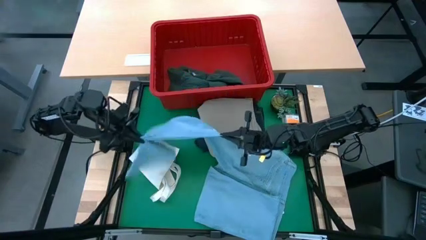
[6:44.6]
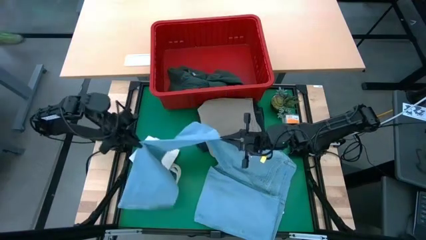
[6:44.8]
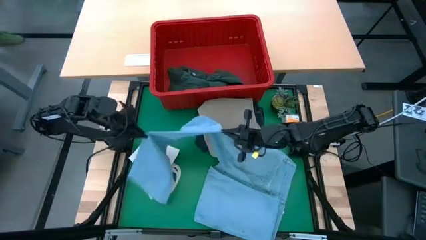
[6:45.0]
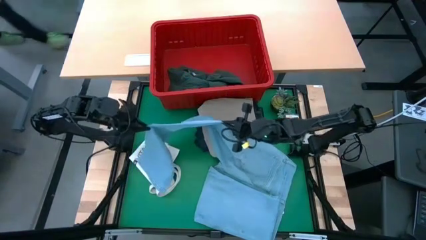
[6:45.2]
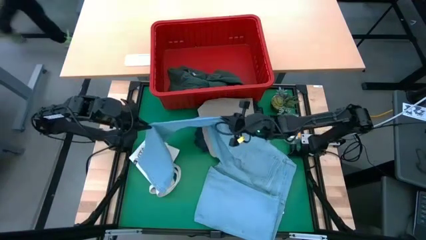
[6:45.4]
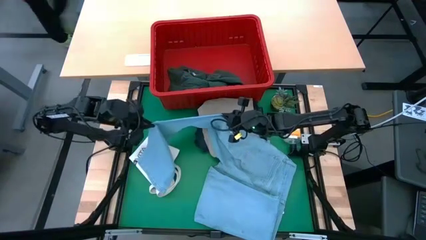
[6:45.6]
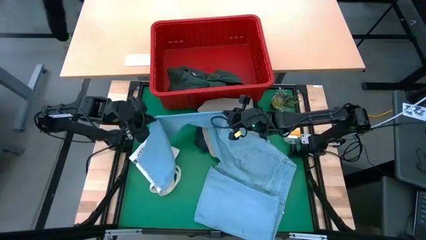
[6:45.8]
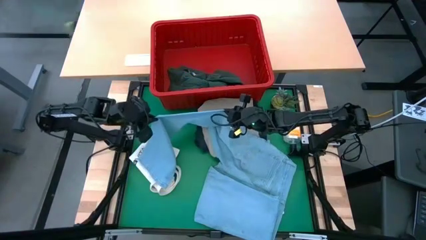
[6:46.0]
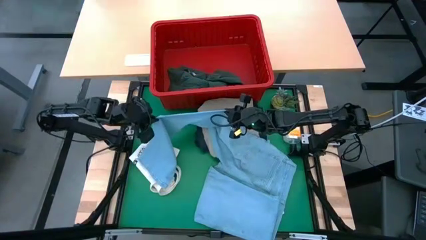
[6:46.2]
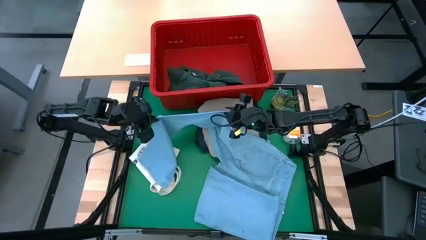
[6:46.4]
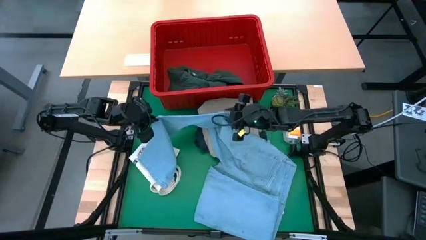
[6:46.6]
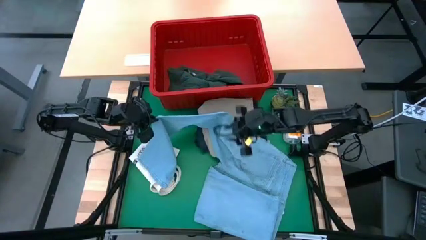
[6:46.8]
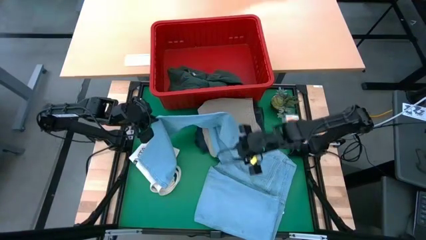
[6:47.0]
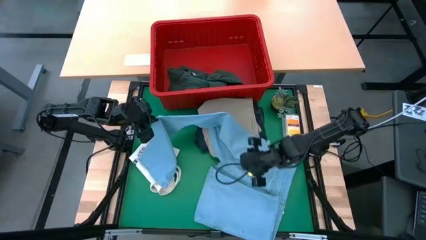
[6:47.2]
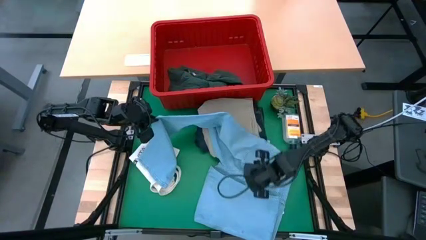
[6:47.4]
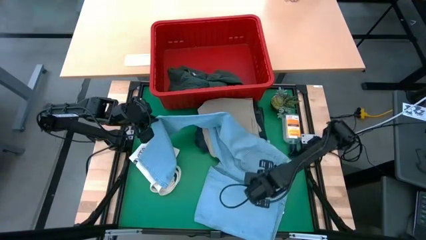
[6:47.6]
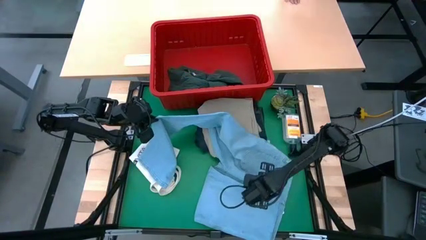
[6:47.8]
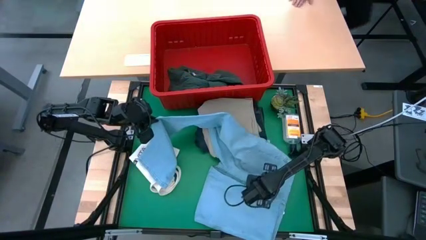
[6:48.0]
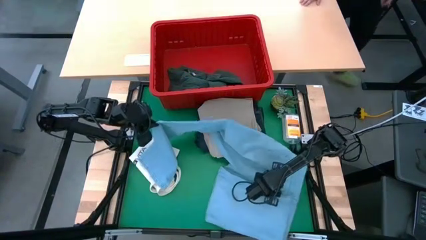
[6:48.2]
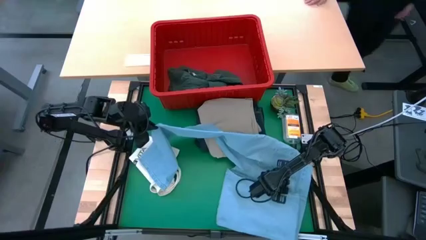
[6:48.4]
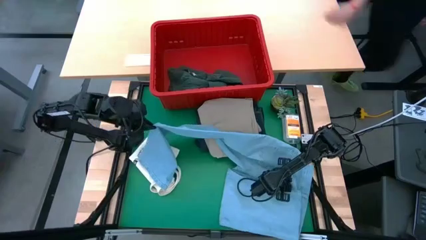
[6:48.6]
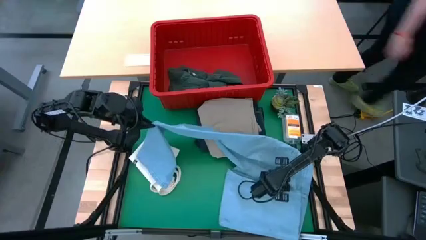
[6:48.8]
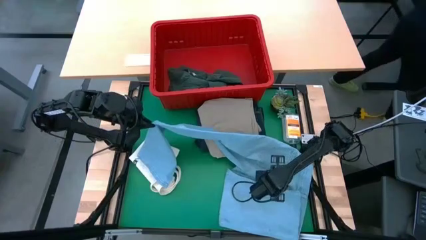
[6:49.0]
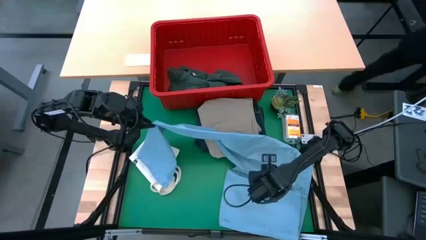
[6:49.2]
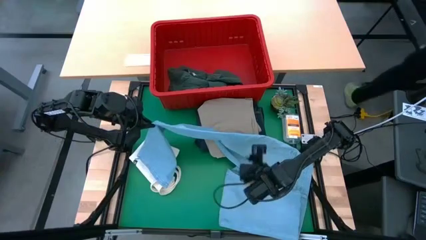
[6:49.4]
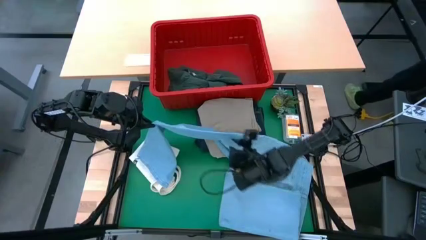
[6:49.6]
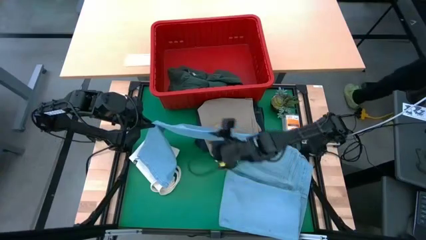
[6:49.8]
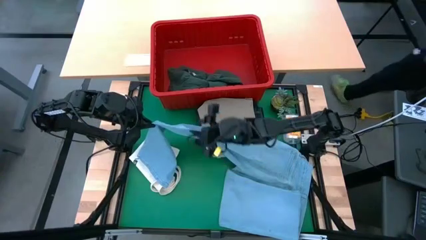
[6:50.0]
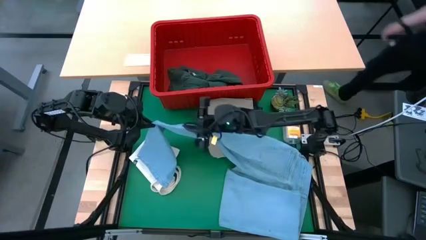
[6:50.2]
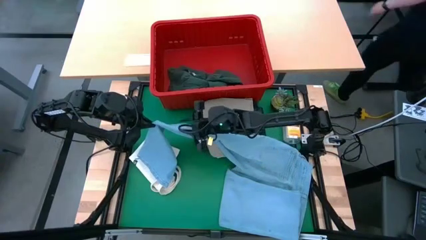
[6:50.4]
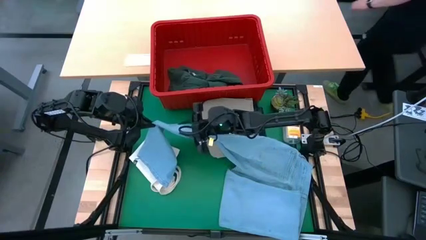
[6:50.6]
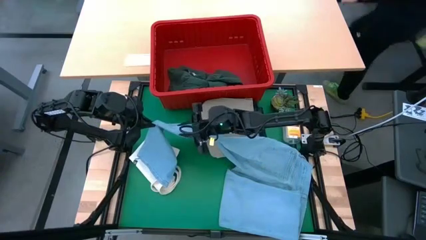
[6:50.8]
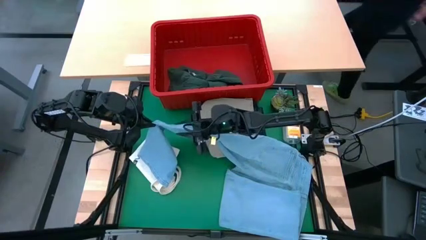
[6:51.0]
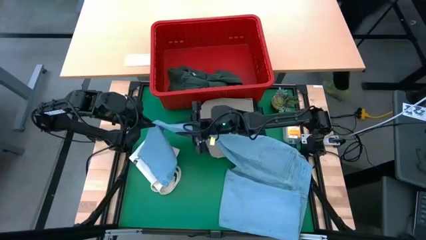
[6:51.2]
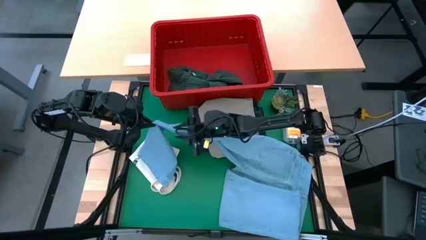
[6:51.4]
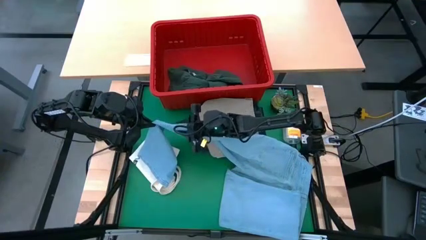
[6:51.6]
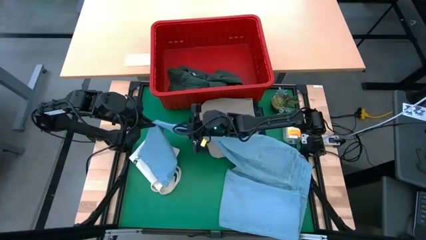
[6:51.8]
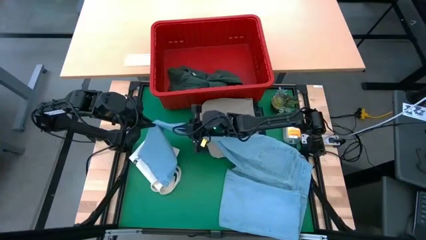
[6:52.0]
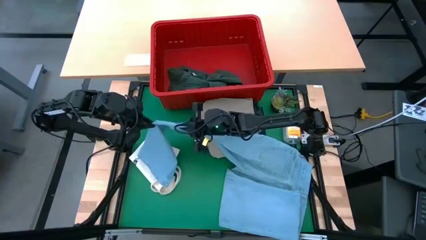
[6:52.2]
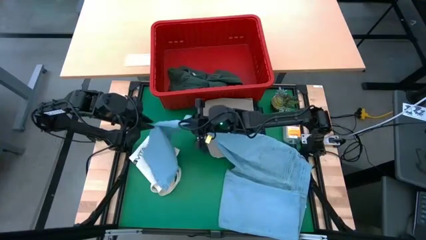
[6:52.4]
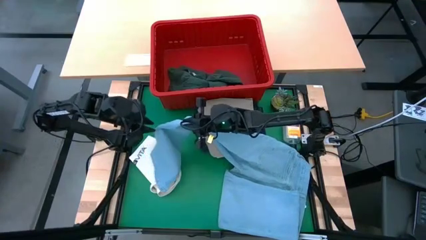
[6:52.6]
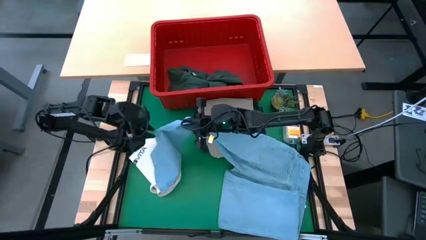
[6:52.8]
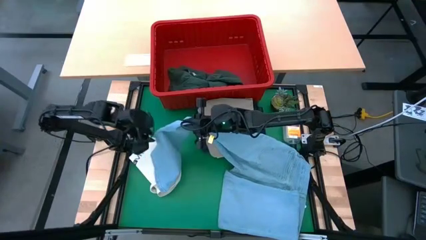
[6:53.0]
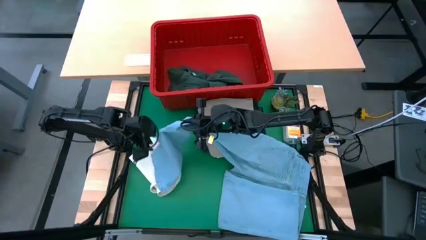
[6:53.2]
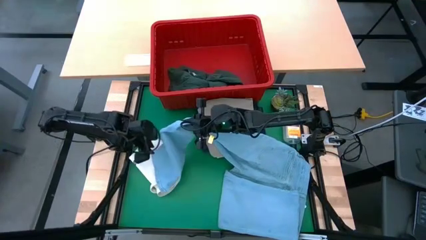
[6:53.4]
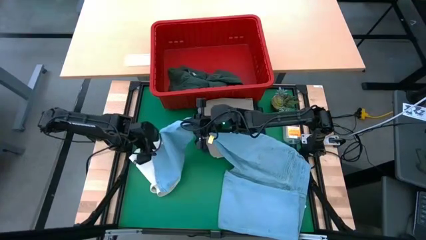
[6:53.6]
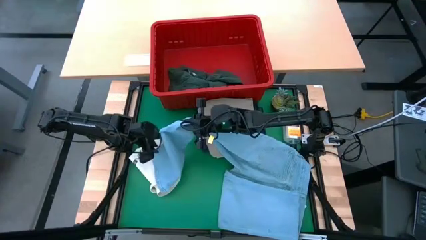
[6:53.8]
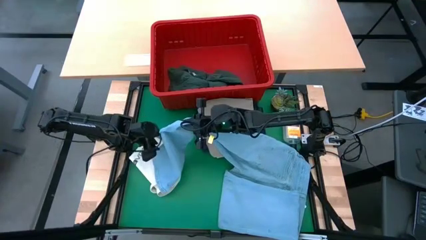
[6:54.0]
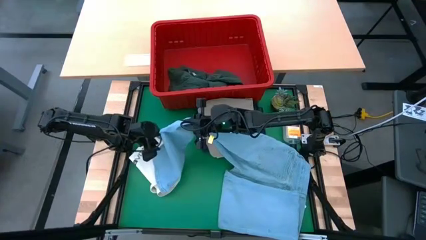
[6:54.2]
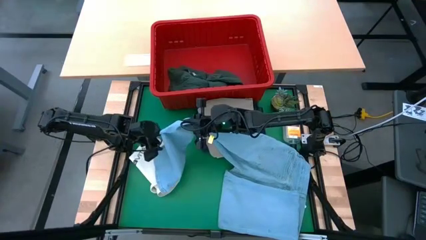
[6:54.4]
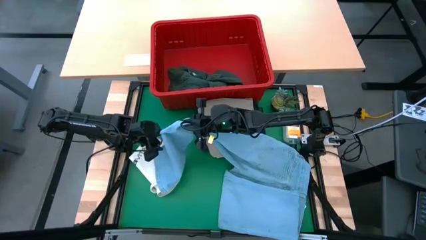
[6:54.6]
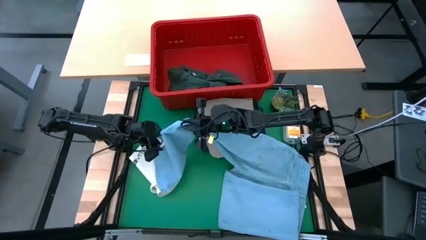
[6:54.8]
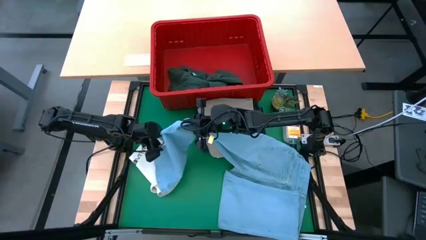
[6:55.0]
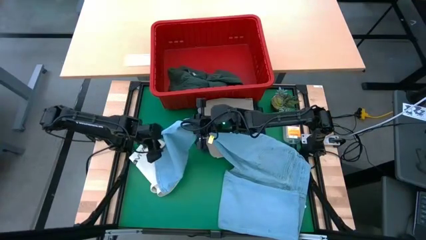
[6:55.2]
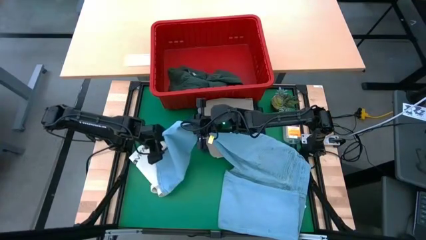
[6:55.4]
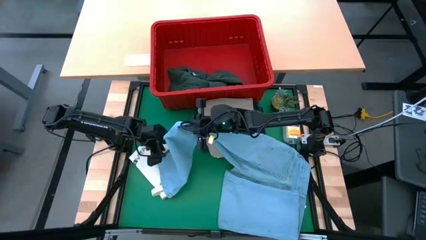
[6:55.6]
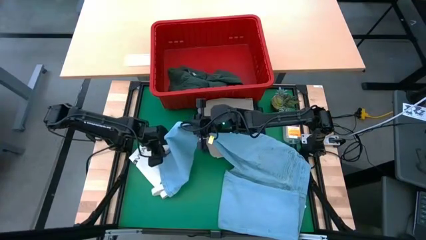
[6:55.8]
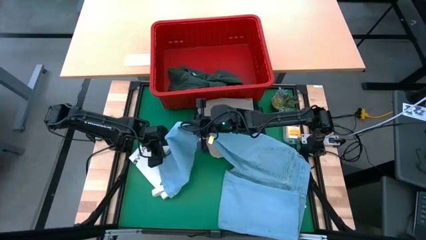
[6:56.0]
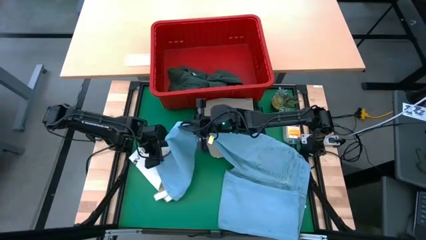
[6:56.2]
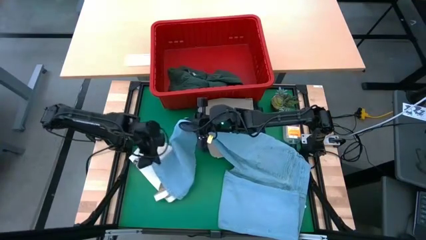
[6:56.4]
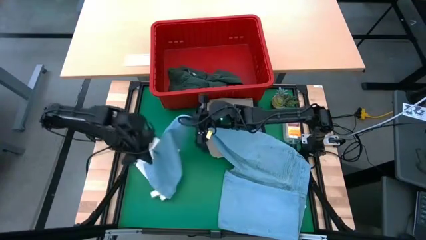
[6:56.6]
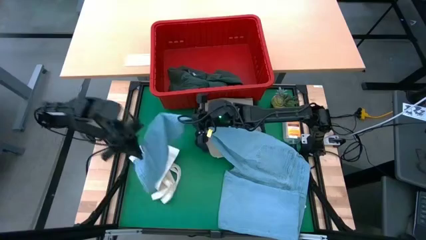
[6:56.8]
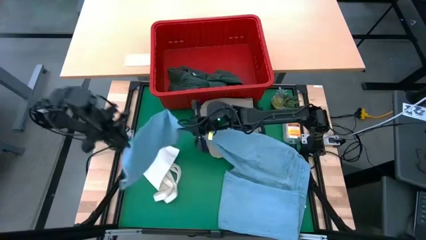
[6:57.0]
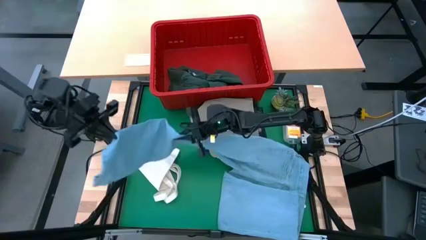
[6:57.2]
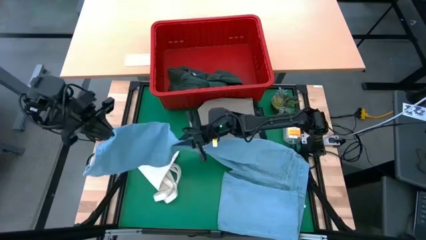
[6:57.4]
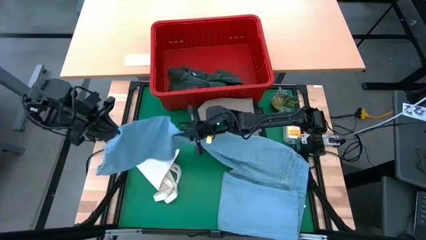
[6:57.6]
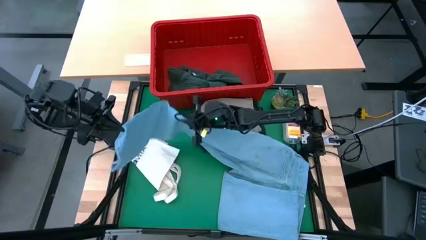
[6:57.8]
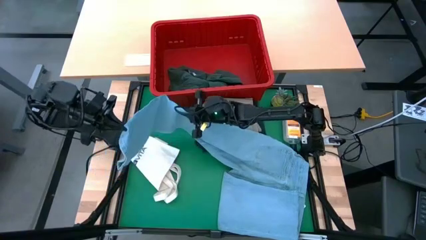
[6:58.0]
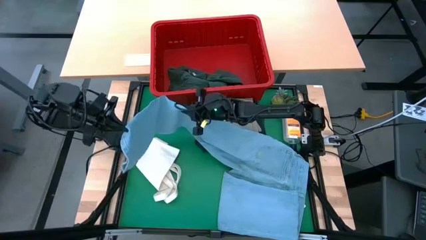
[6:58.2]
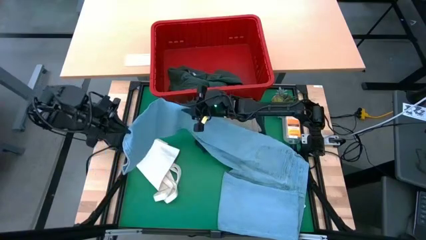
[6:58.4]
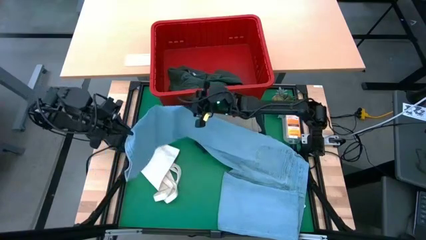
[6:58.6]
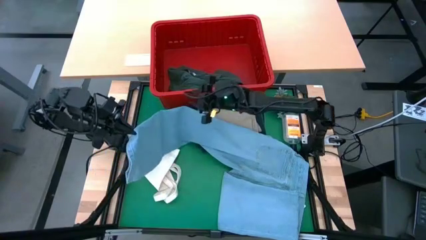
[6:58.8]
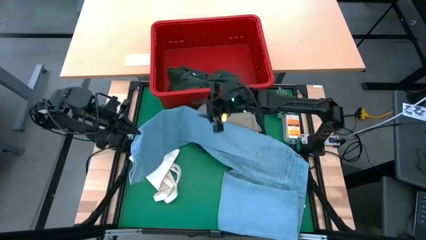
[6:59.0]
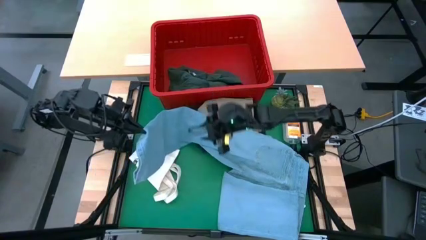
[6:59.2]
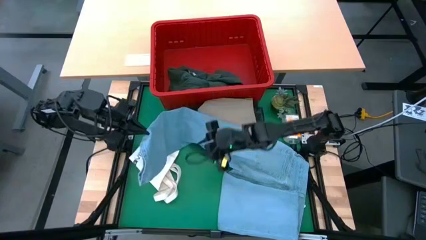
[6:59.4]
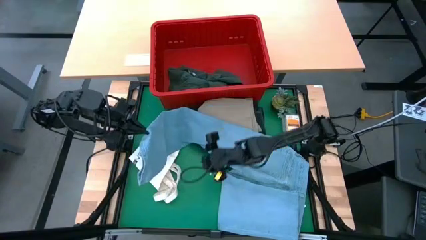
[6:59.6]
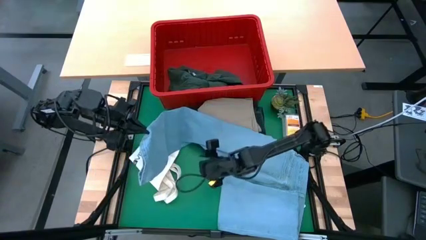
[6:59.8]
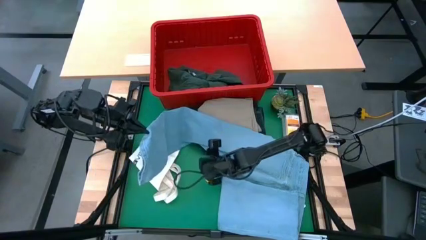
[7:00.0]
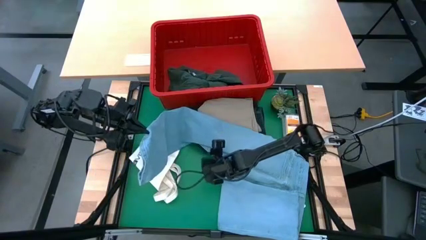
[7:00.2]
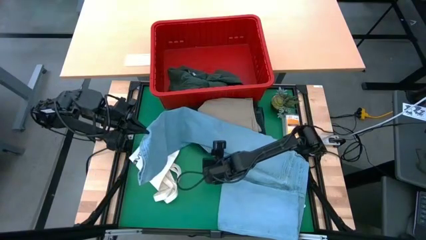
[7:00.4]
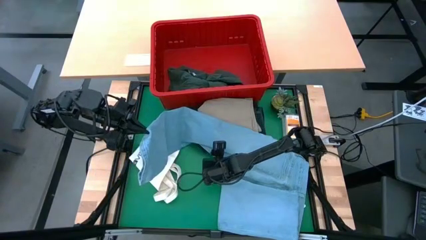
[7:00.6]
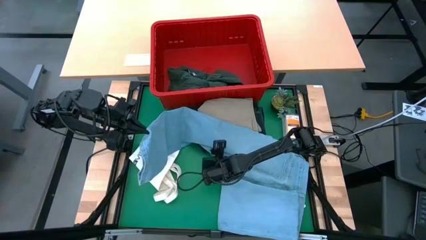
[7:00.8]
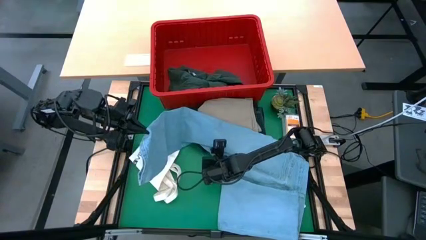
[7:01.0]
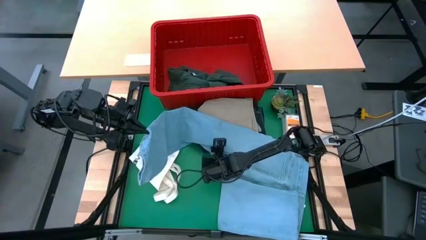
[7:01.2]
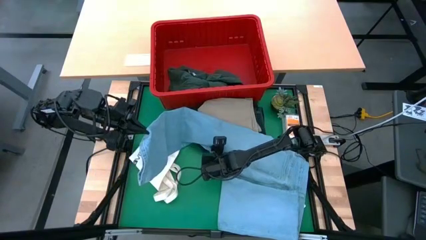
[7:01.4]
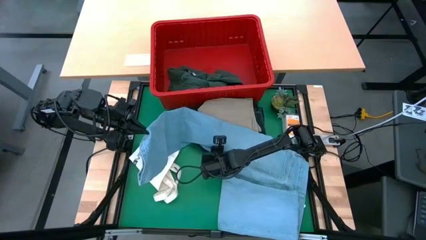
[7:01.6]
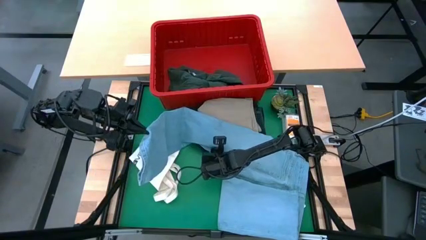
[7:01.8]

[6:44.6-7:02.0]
Task: Fold laundry
Fold the blue pants

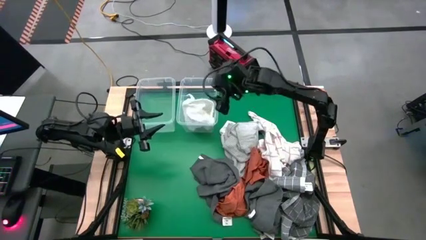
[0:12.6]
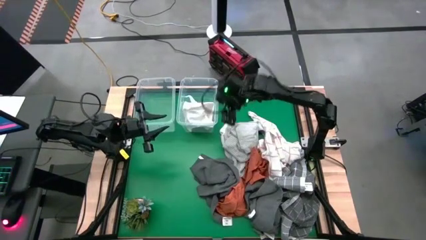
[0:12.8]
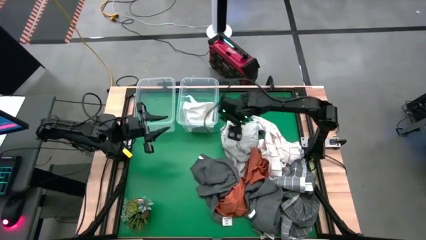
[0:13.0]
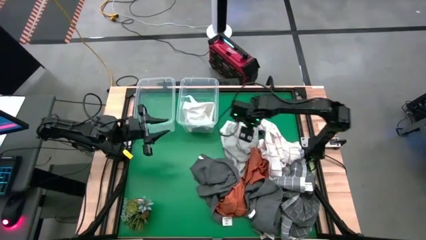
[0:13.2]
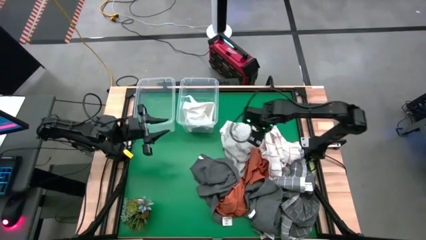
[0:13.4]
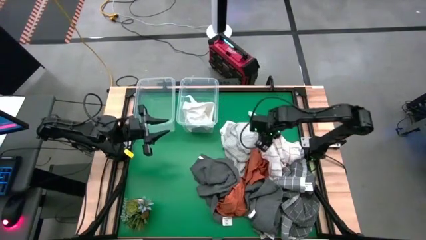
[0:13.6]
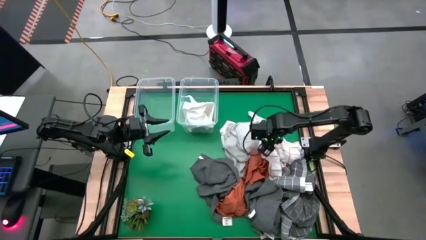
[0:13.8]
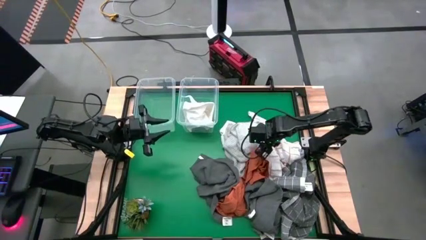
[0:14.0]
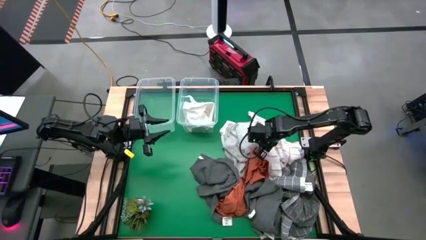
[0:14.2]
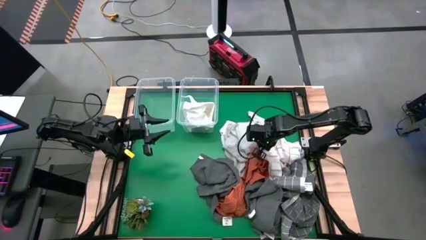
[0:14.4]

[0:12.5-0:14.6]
Task: Sort towels by color in basket
Put the white towel into the right transparent bin
